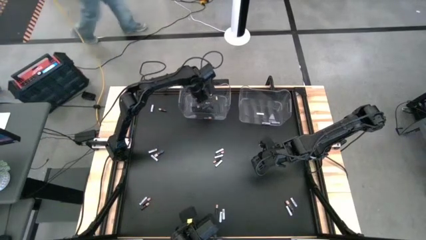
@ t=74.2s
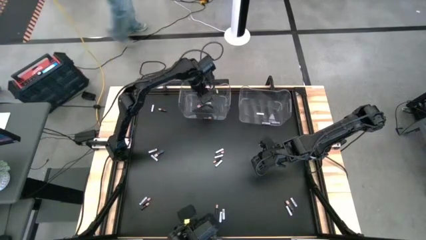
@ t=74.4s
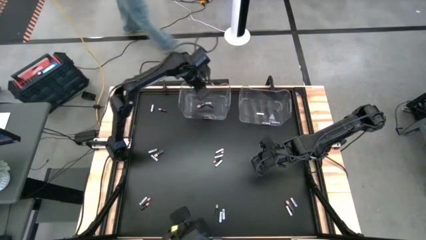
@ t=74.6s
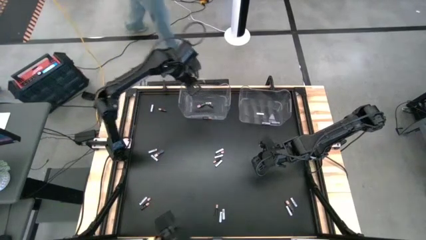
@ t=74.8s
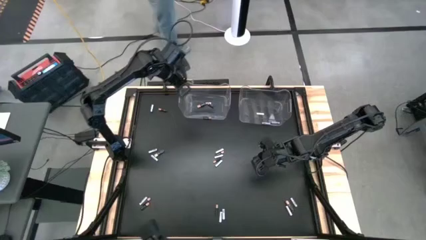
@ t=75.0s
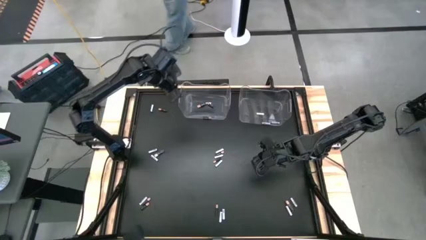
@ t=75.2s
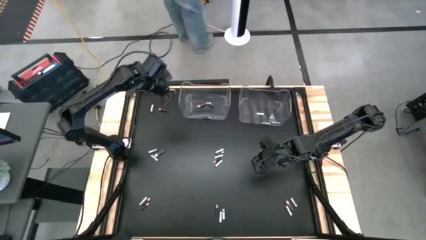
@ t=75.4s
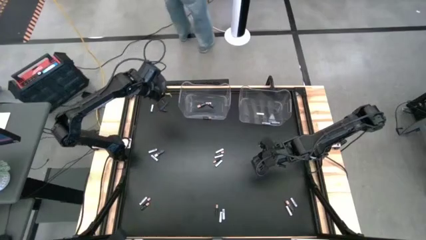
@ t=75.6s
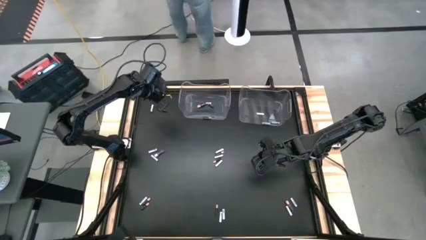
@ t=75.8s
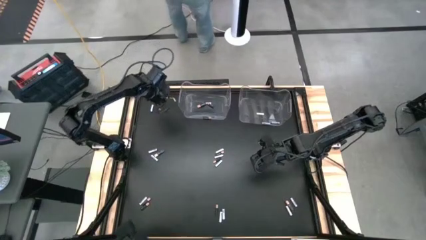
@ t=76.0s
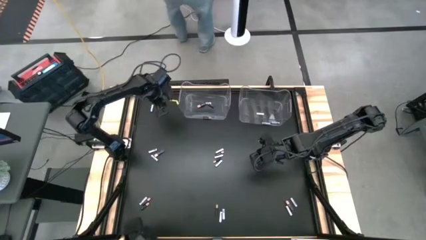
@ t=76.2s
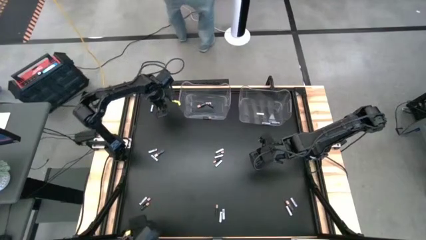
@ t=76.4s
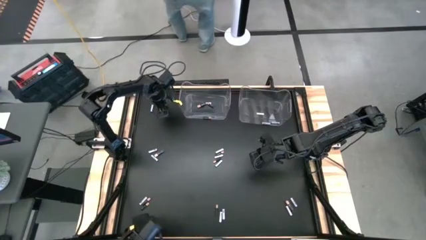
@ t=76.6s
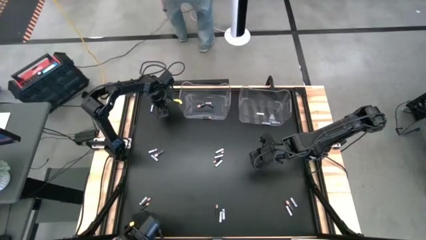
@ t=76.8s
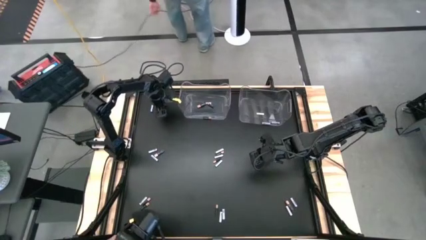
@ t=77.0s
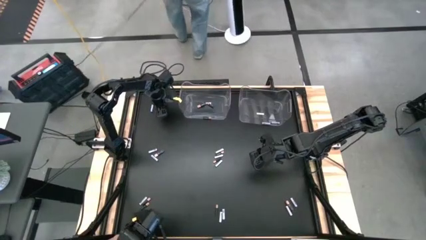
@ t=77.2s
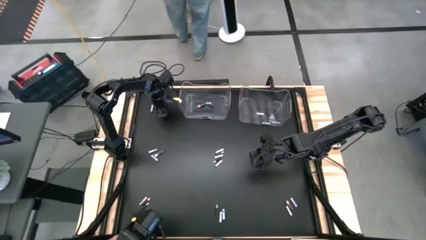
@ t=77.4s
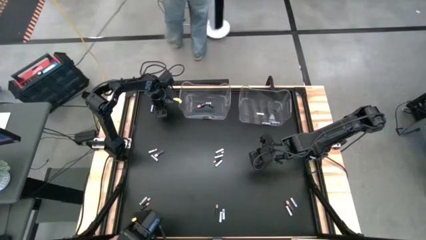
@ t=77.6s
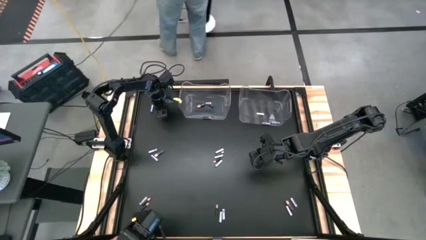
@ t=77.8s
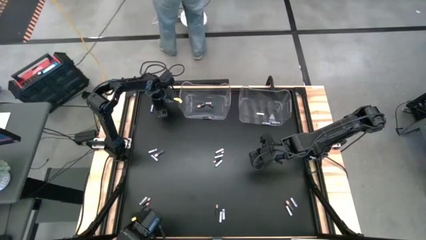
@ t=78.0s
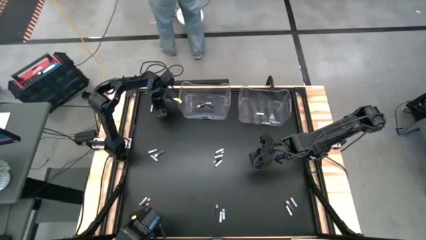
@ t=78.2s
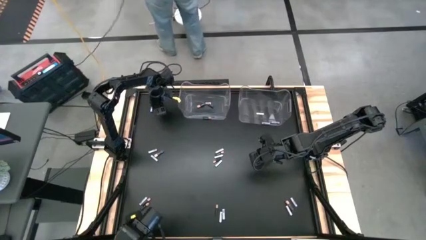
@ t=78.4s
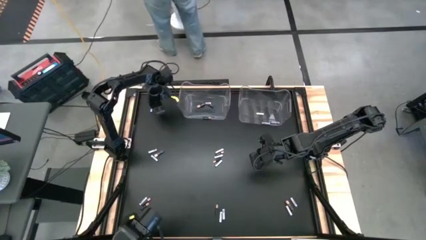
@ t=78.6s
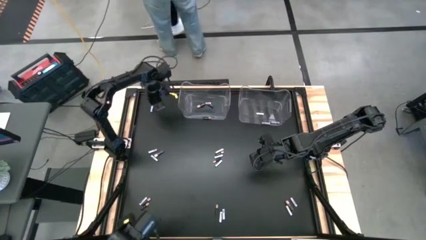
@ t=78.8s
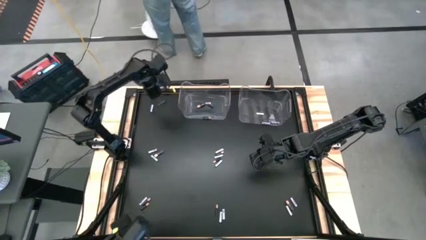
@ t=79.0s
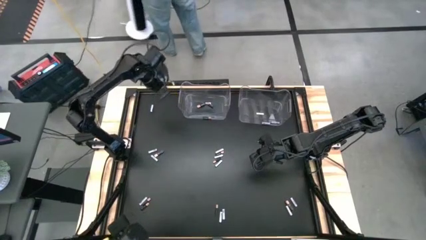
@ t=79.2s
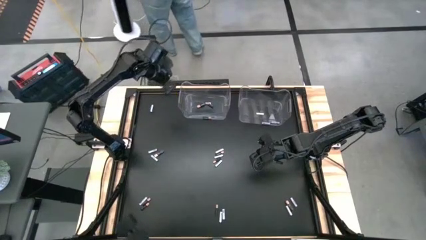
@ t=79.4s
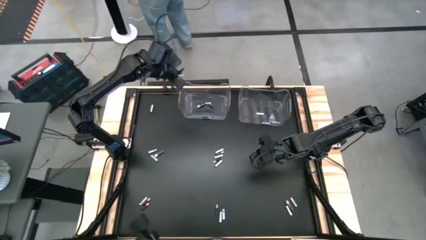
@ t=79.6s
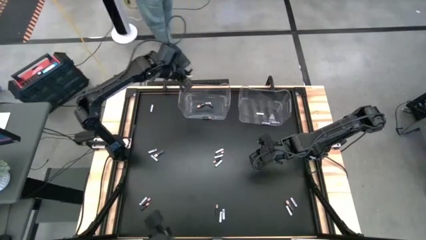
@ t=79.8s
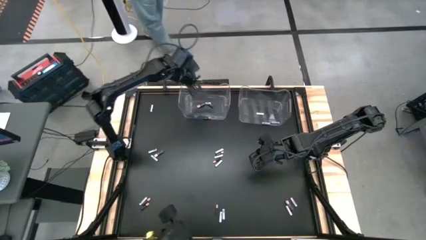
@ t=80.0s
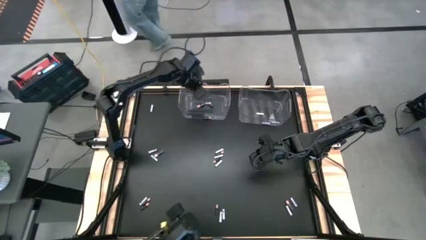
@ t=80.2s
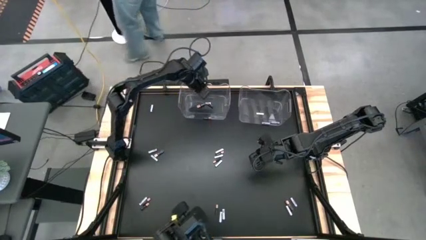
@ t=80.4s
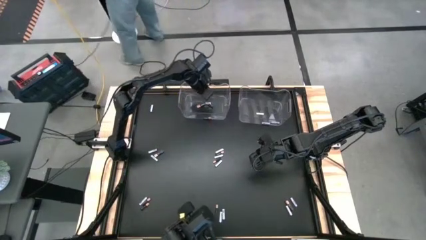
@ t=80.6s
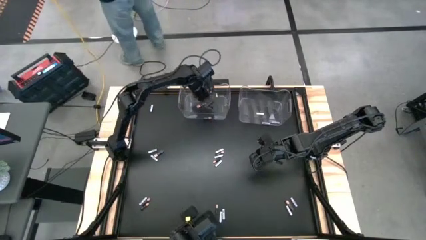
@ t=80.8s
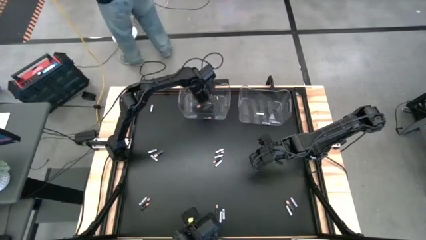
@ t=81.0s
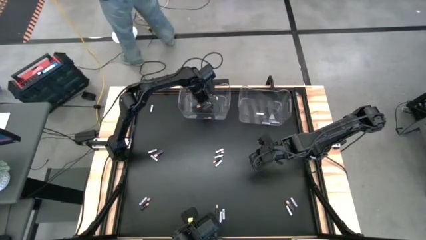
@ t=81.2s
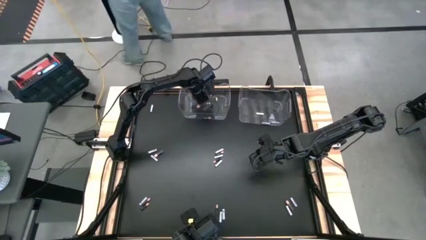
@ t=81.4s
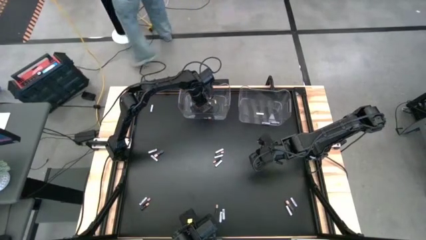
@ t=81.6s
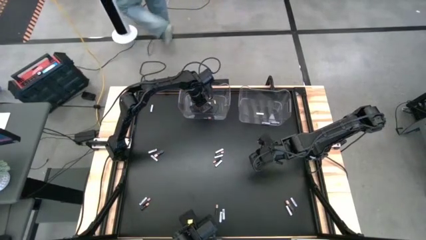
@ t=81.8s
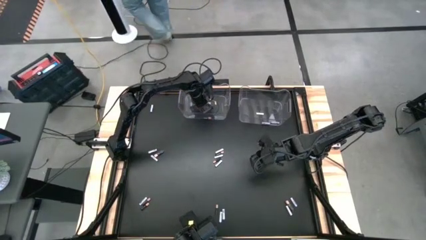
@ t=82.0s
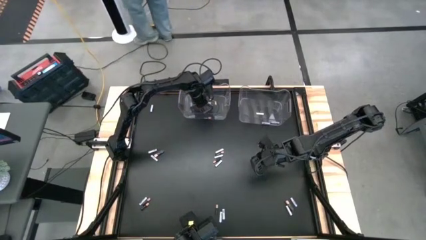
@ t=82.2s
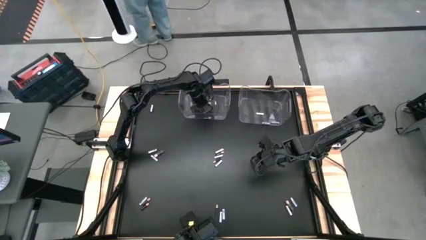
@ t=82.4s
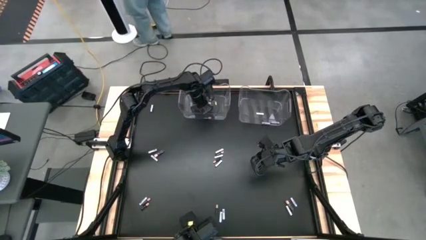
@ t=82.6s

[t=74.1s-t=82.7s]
Task: Sort batteries
Put the black battery into the left transparent bin

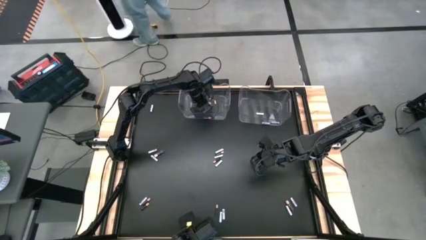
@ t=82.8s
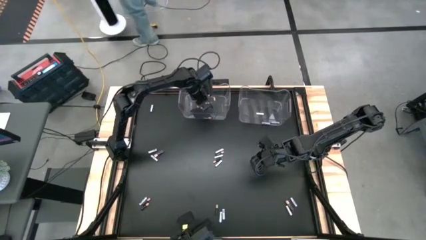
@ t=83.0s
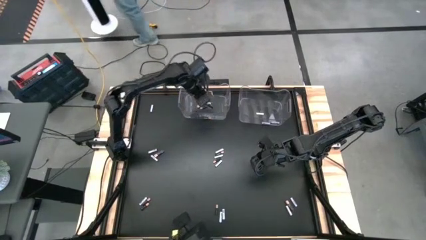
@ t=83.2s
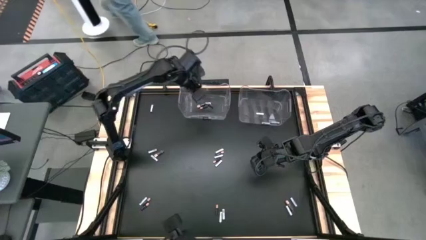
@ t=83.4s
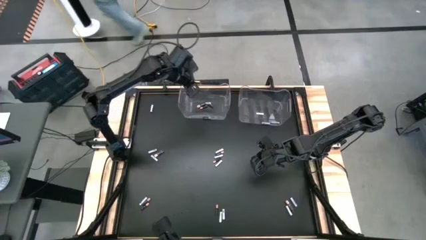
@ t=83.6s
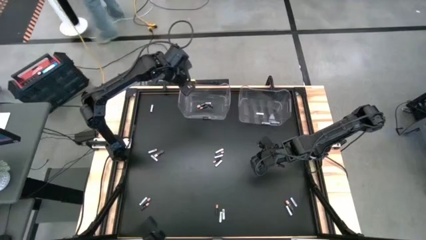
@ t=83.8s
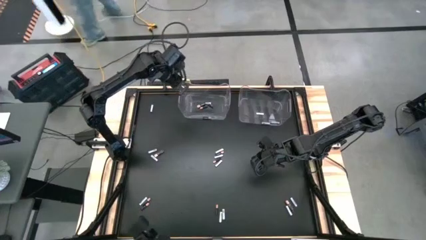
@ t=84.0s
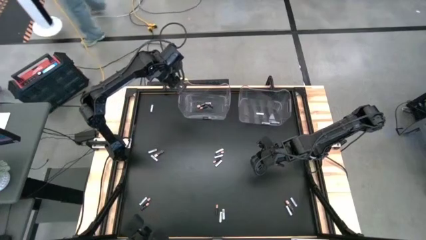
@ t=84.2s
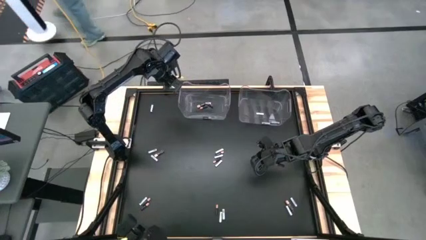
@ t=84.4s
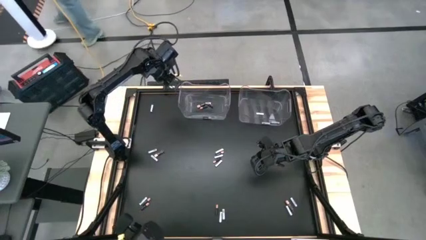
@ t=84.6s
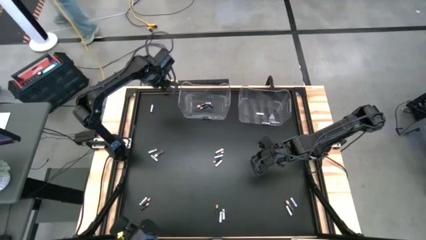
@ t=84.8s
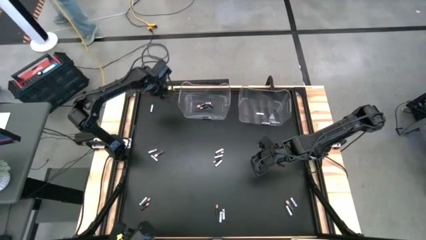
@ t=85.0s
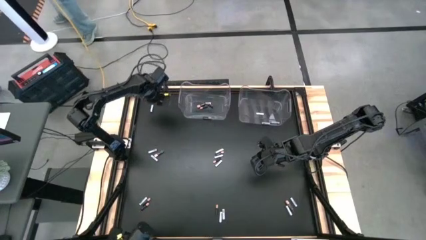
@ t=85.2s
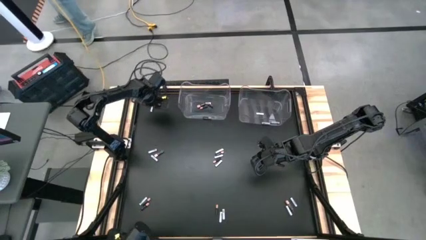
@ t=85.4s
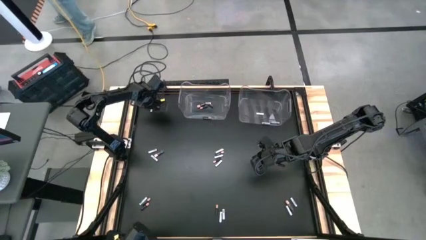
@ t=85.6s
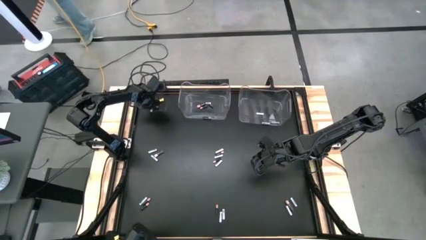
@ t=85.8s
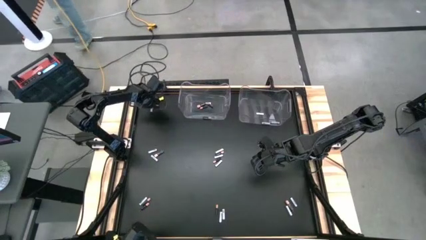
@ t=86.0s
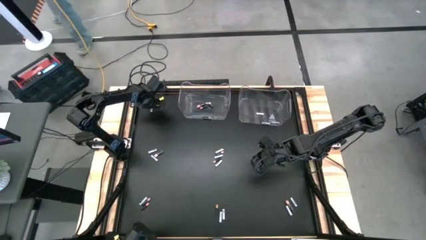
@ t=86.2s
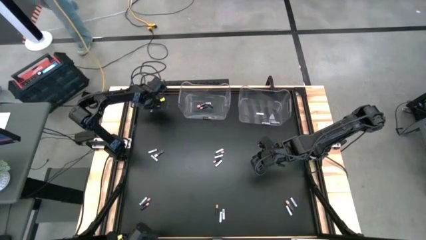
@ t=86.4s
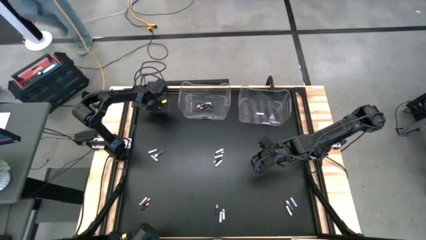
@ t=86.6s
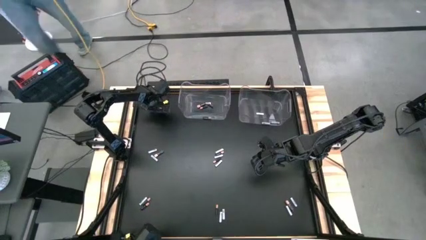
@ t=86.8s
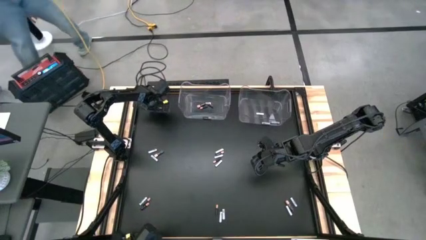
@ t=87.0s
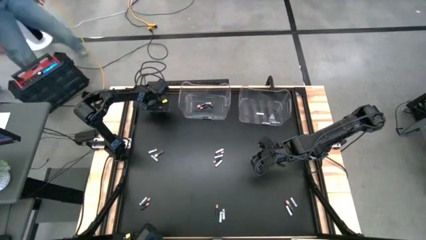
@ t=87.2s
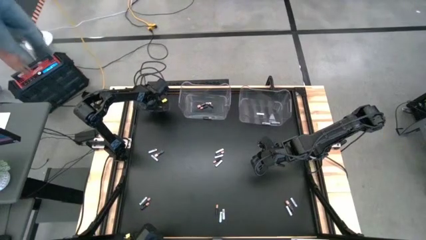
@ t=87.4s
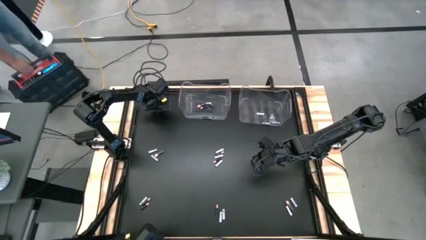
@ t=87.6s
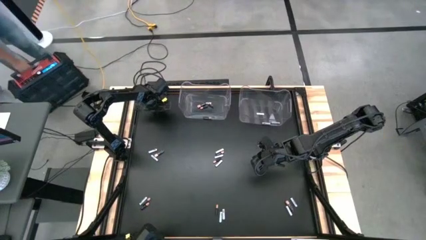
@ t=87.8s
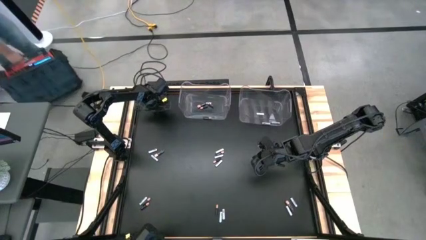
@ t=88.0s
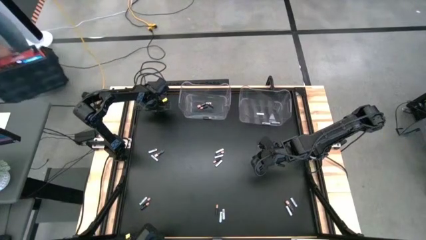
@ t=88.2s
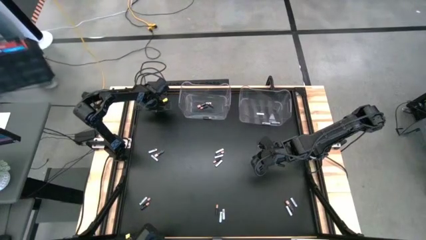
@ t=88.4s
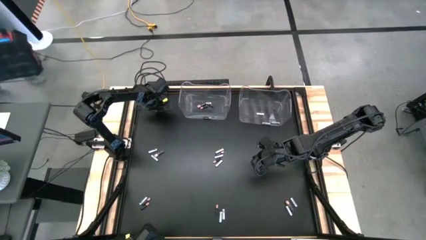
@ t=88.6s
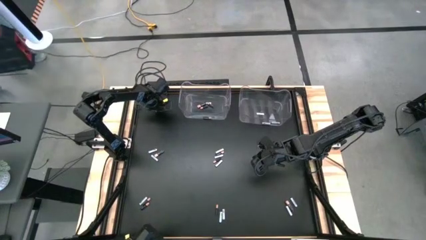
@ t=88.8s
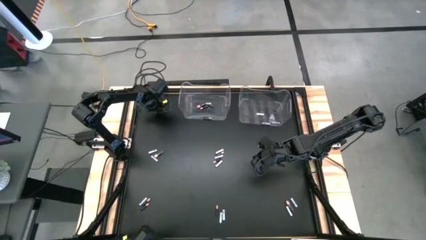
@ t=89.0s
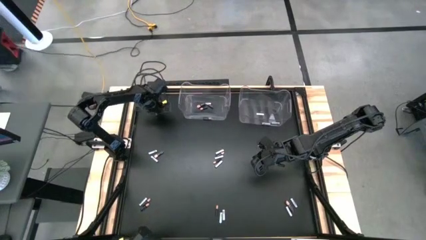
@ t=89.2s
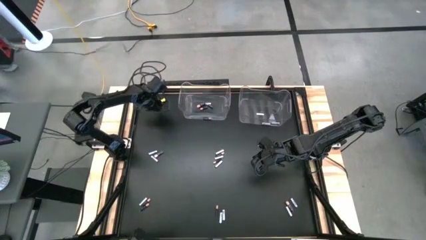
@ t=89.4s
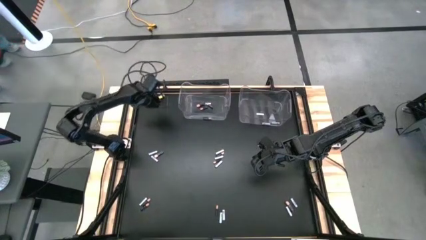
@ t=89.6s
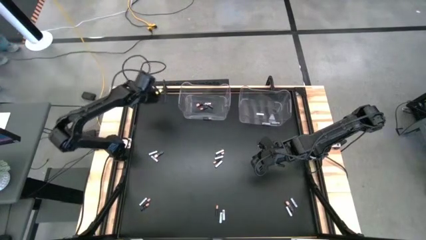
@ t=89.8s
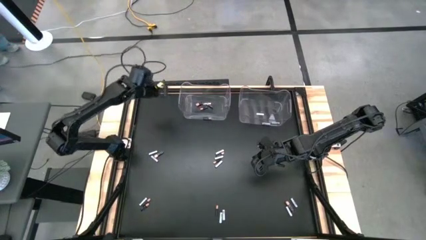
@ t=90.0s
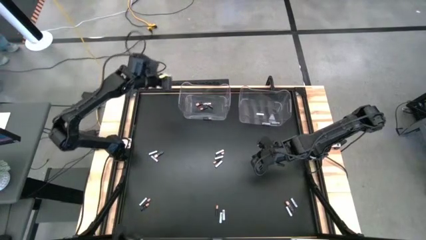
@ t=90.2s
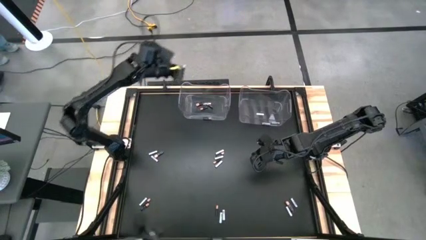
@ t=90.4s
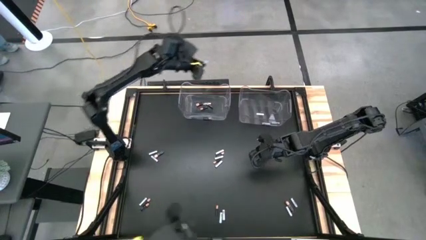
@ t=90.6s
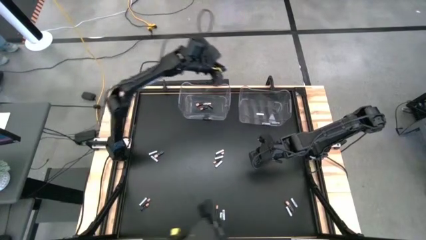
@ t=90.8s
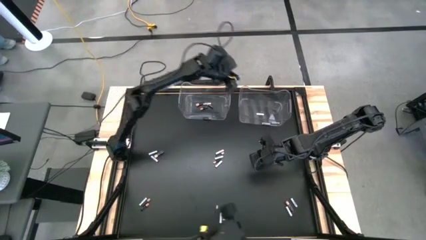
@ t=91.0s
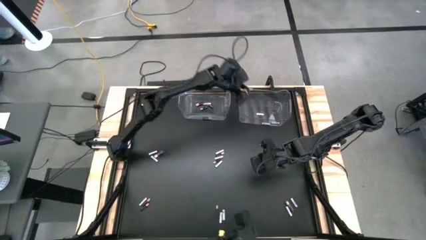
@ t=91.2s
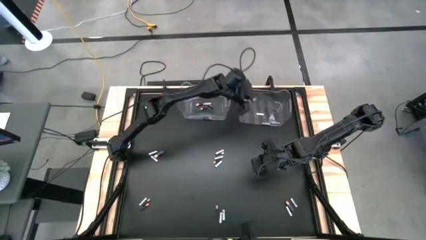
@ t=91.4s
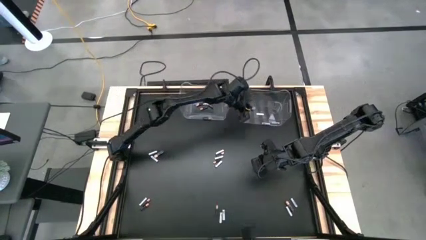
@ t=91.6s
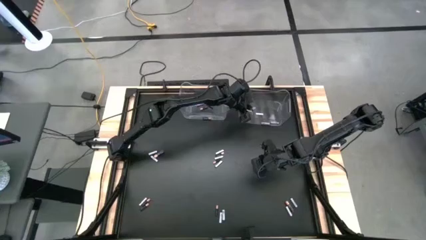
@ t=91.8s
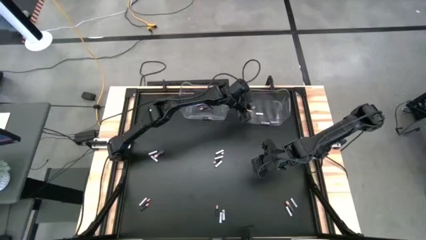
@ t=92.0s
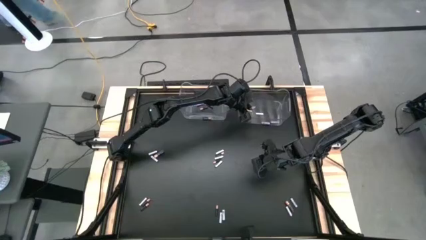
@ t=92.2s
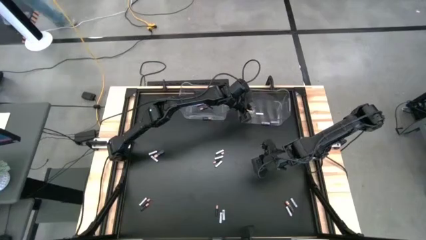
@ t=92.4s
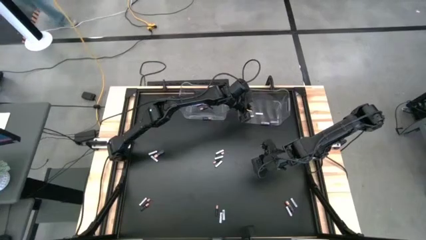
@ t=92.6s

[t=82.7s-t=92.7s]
Put the white battery into the right transparent bin
